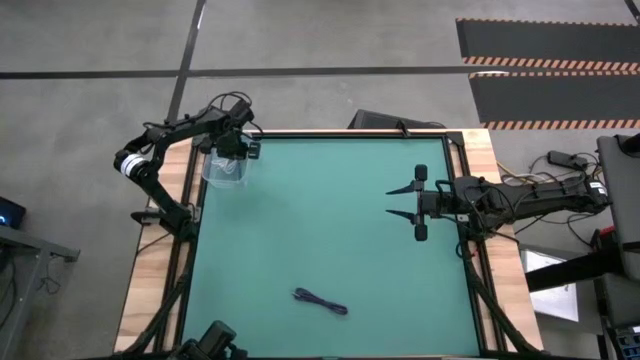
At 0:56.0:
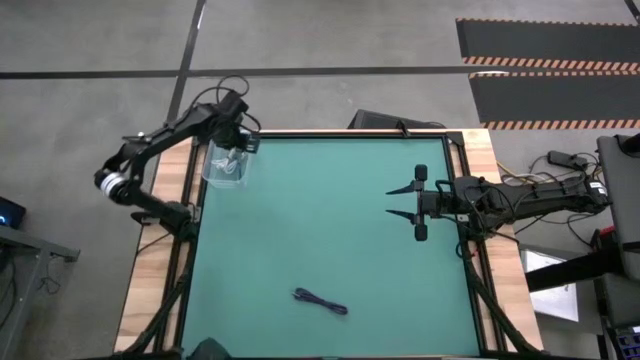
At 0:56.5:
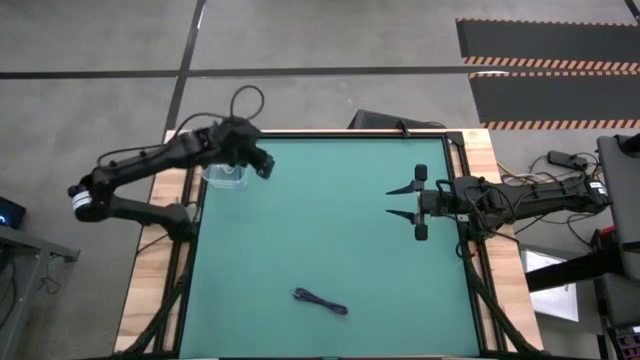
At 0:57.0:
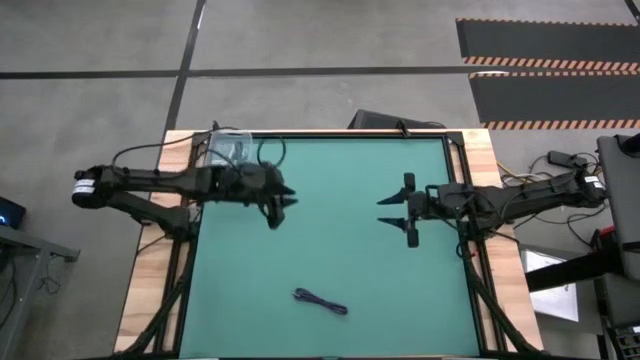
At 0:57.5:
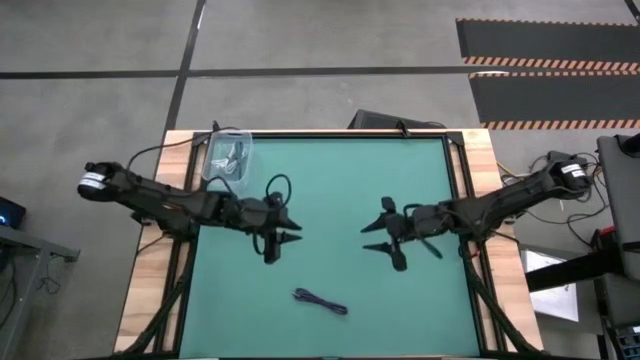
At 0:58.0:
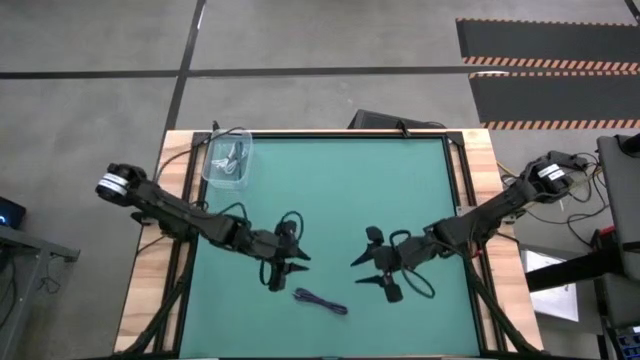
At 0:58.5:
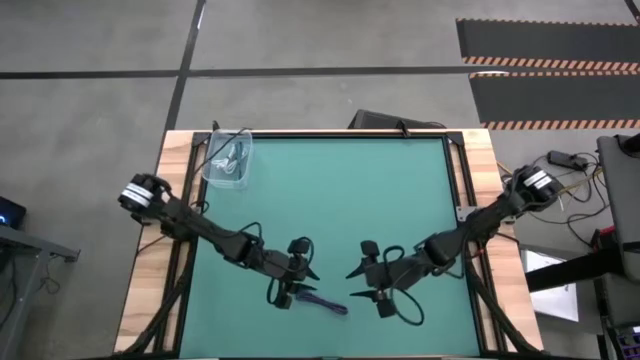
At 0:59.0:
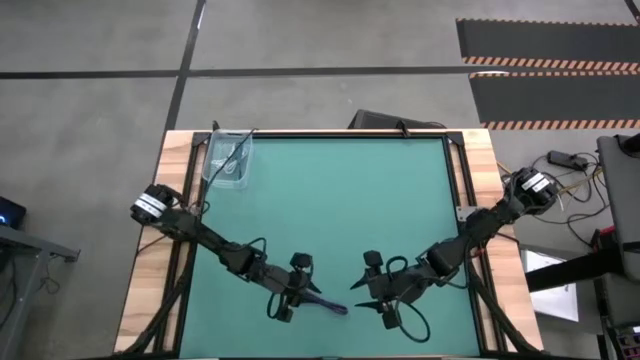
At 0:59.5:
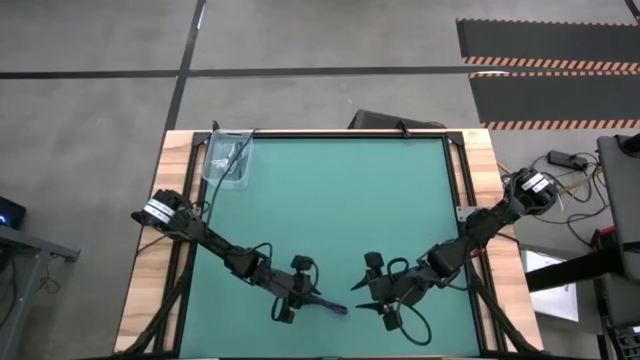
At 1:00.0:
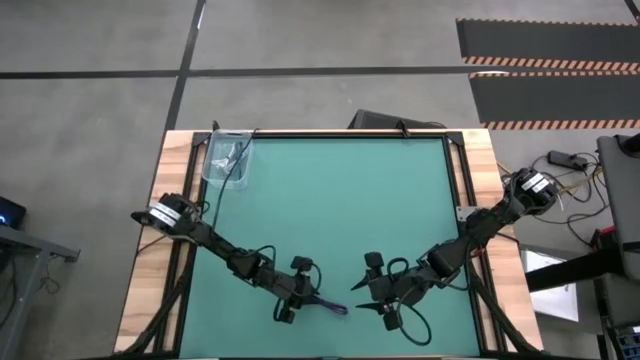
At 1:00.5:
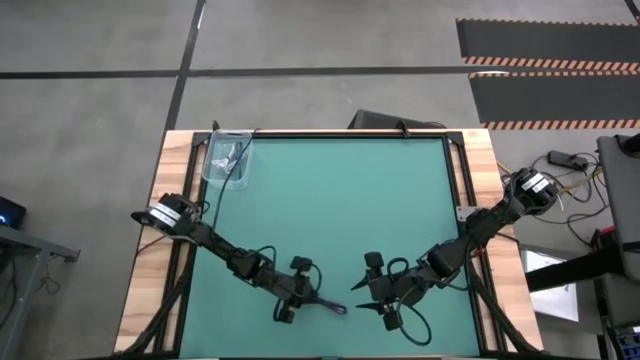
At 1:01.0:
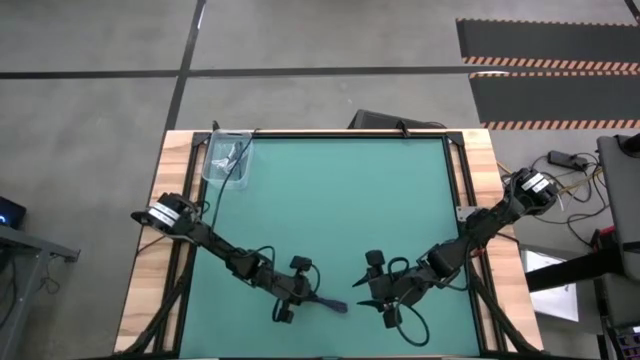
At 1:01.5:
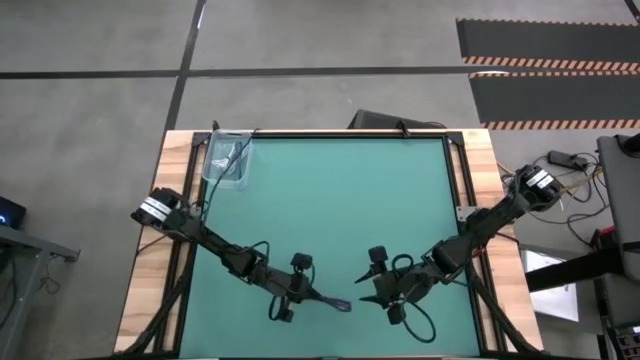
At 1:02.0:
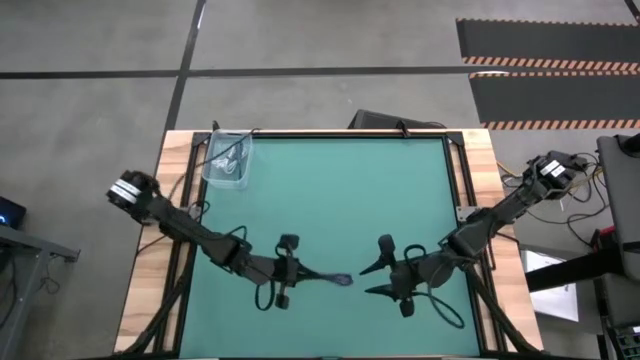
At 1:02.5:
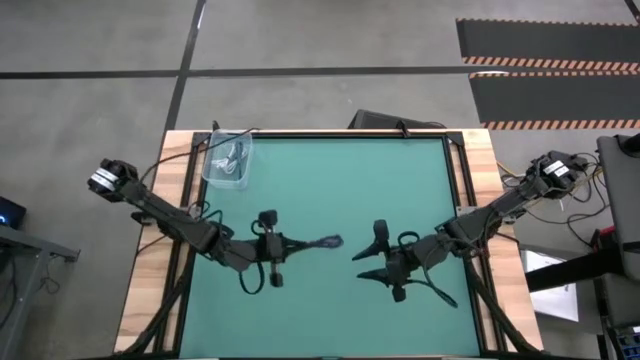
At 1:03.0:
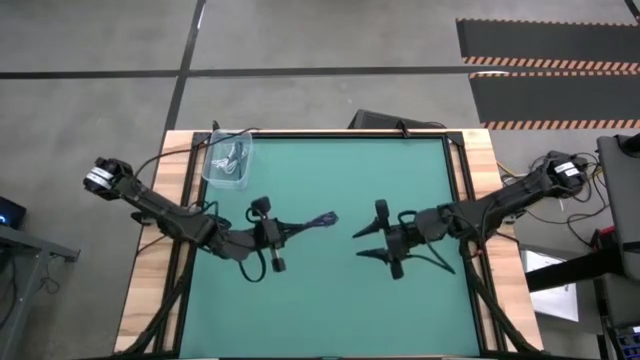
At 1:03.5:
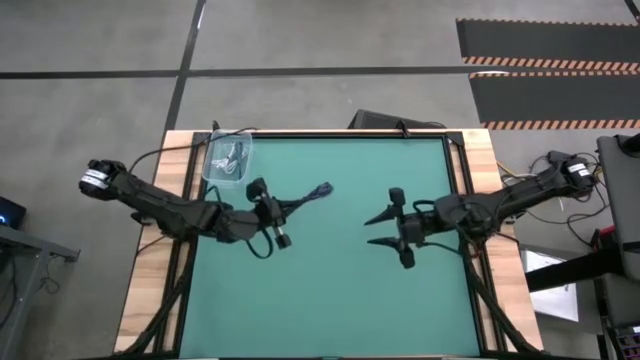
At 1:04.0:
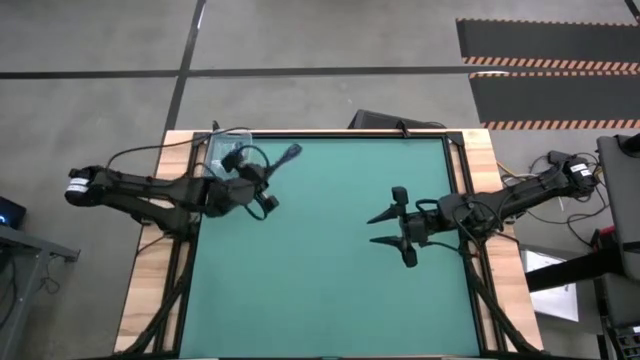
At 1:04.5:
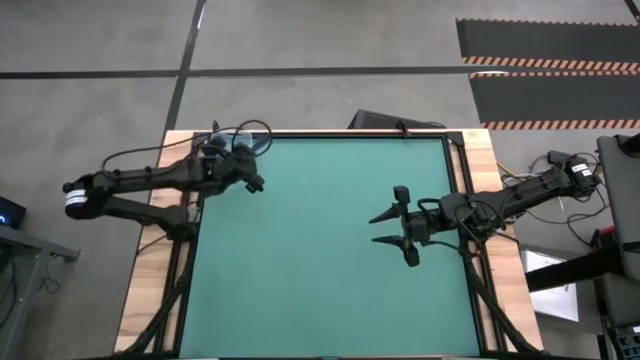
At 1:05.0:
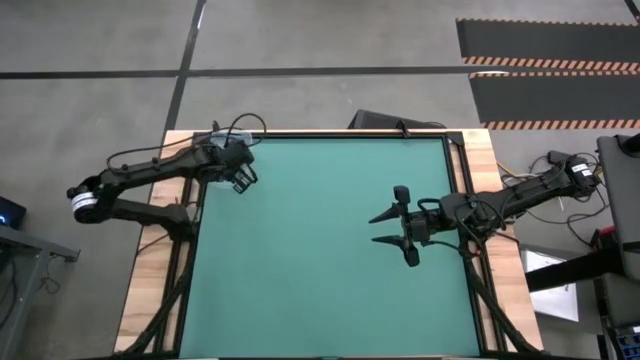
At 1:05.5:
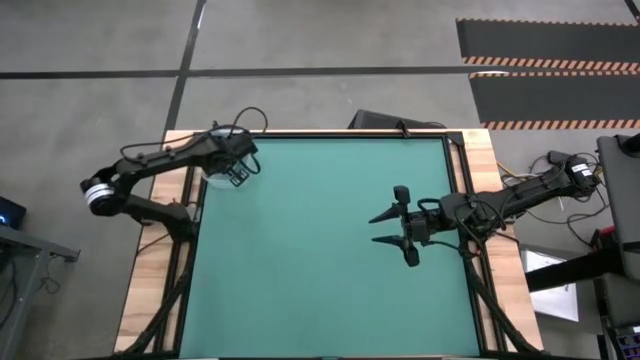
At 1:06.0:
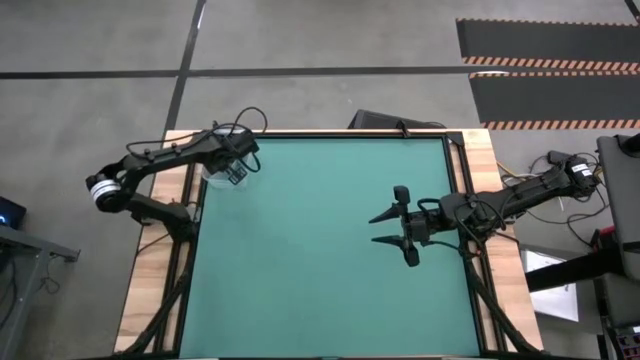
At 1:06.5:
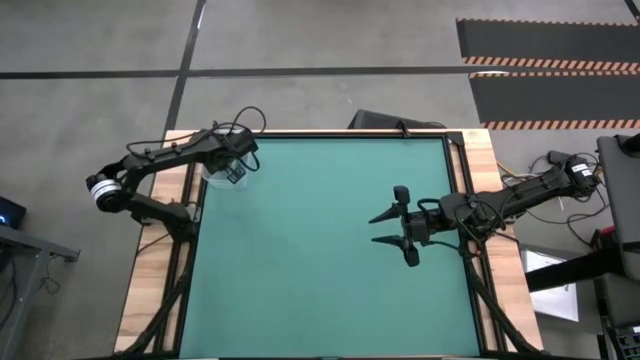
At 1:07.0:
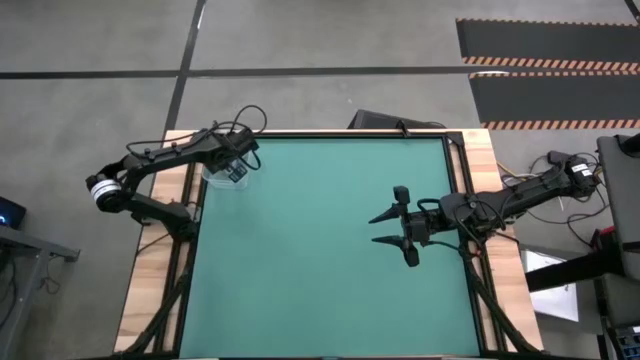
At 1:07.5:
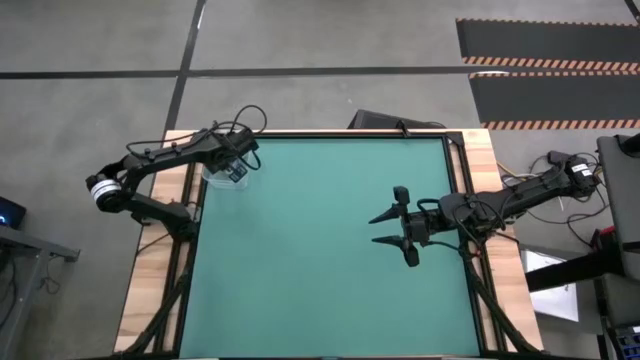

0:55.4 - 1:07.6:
Task: Pick and place USB-C Cables
Put the violet charger cable into the transparent bin

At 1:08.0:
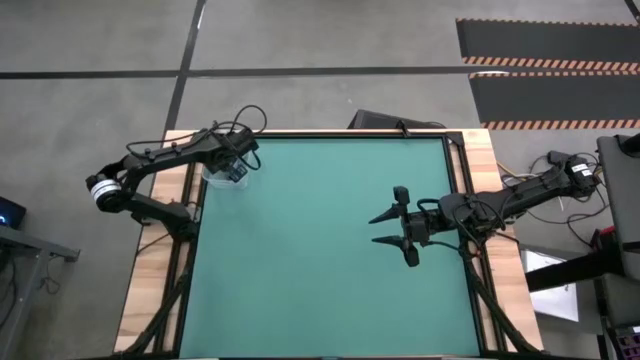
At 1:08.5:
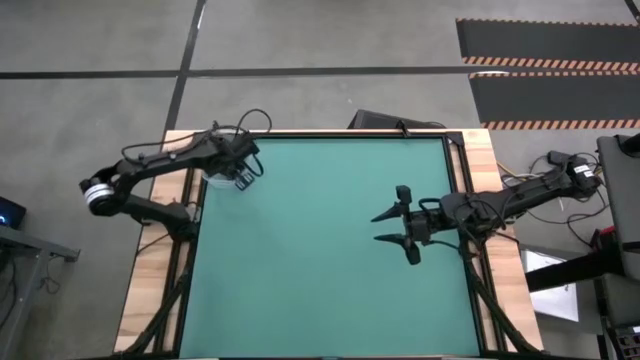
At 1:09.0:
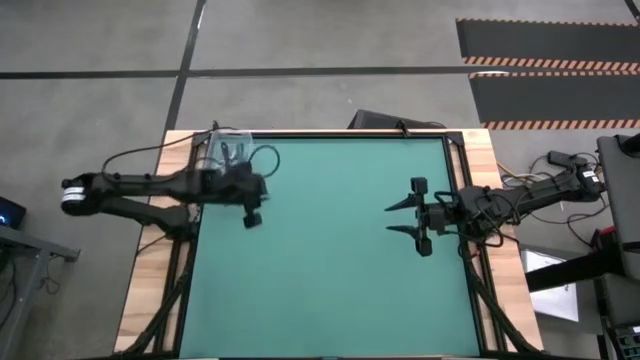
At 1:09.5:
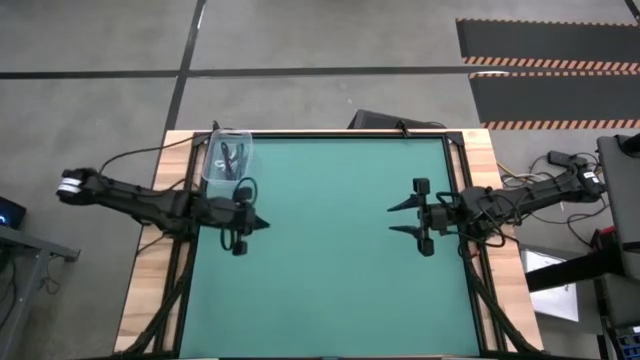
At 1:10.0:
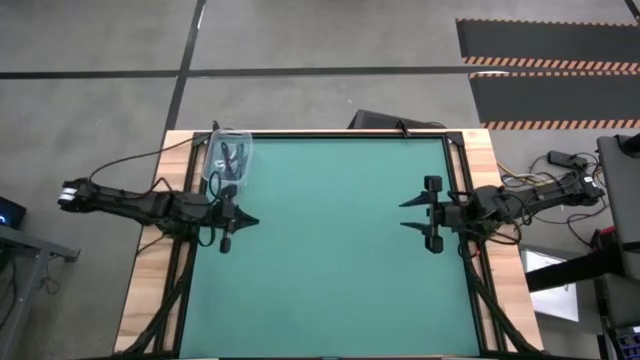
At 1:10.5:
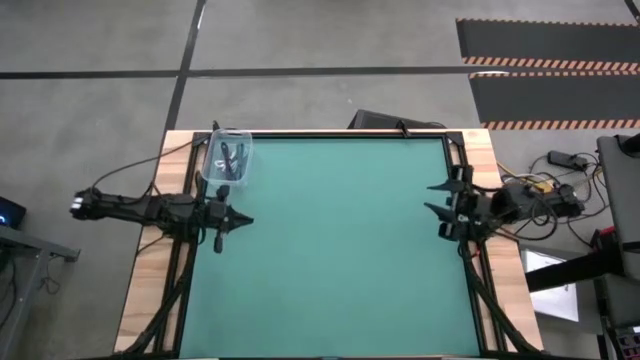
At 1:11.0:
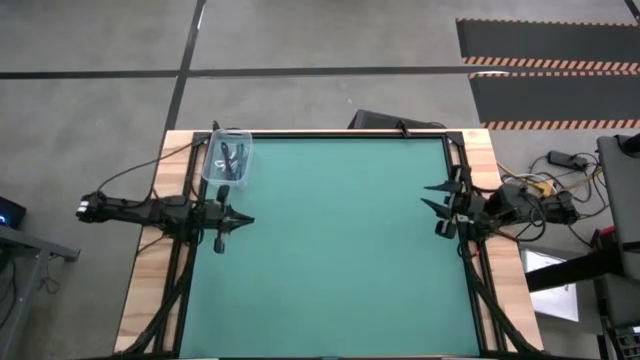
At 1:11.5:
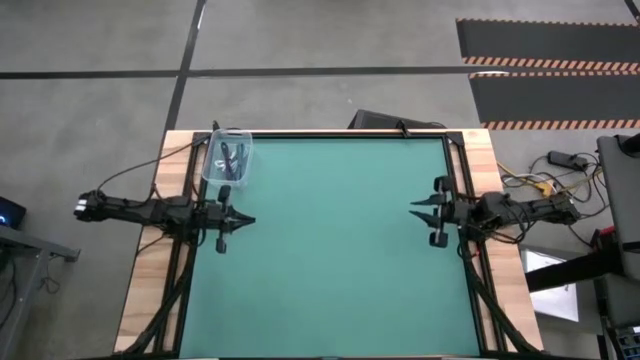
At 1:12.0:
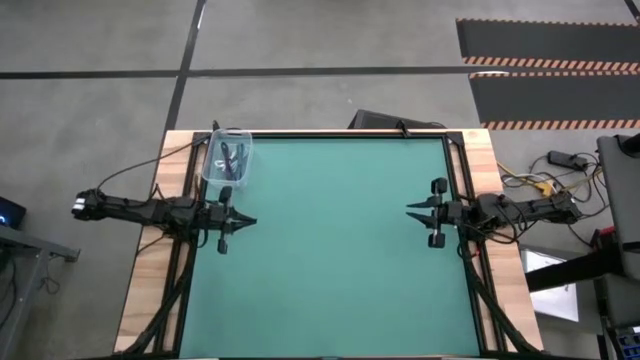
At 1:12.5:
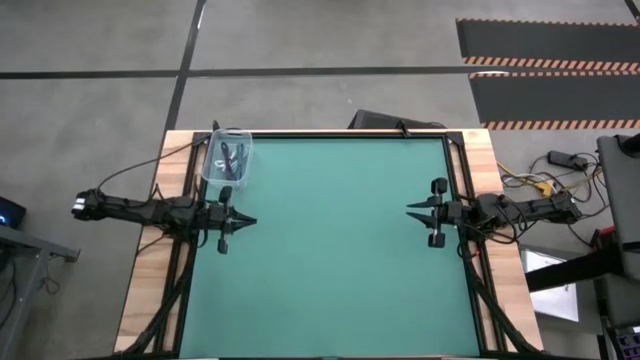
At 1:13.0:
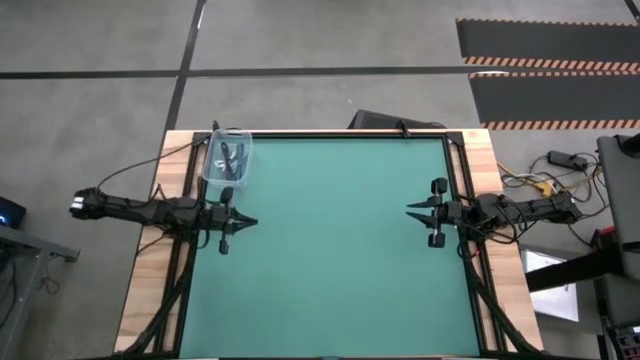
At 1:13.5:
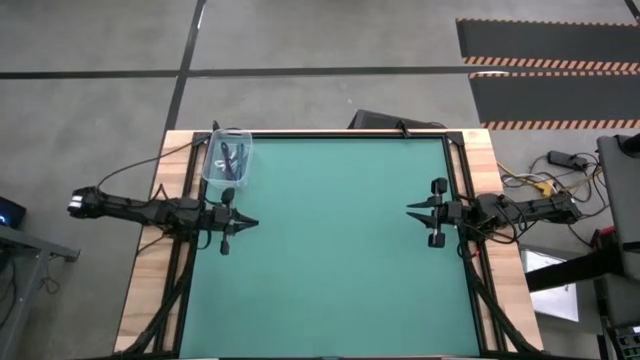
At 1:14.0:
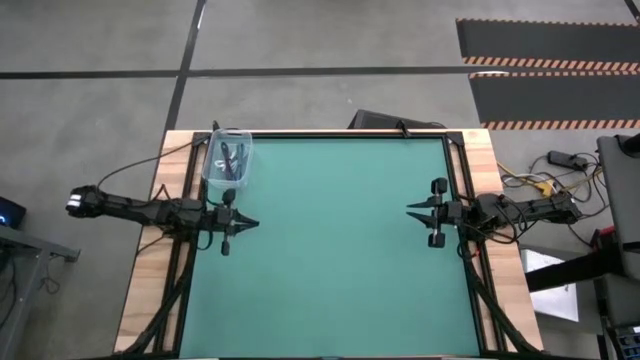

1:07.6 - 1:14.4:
Return to Home Position

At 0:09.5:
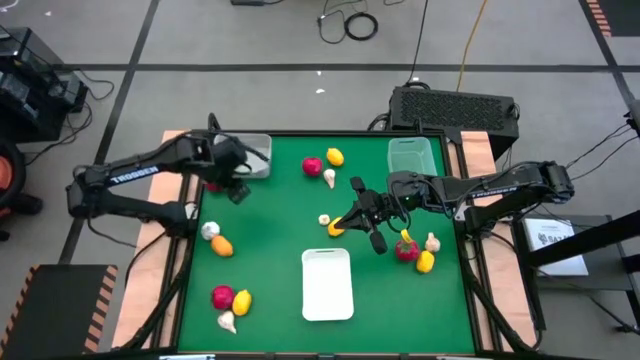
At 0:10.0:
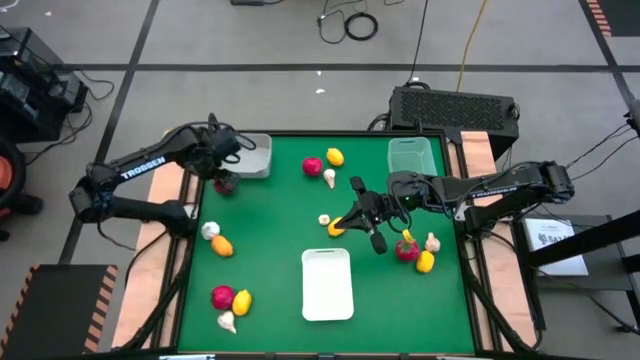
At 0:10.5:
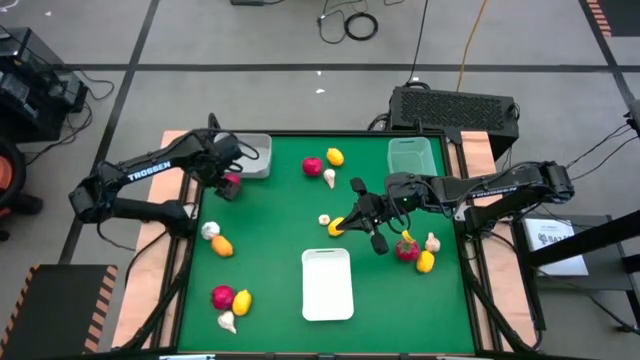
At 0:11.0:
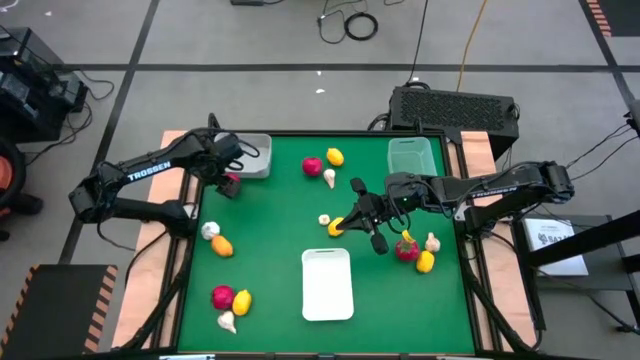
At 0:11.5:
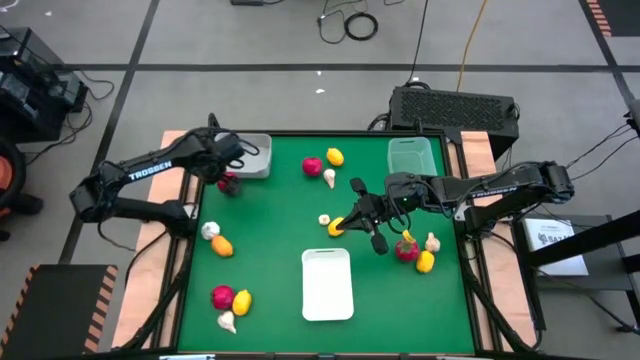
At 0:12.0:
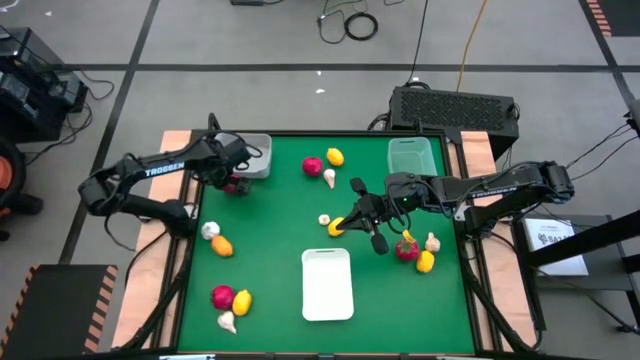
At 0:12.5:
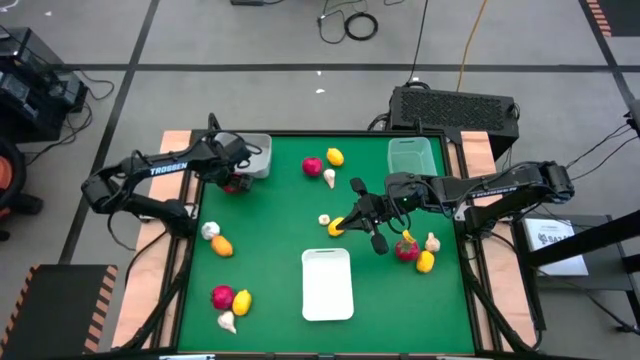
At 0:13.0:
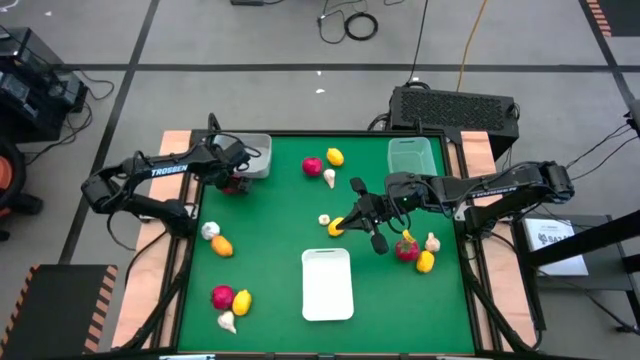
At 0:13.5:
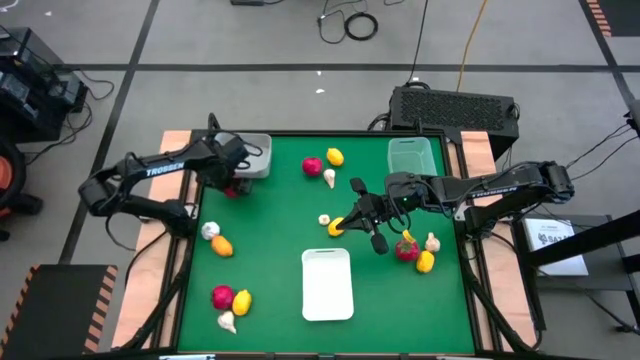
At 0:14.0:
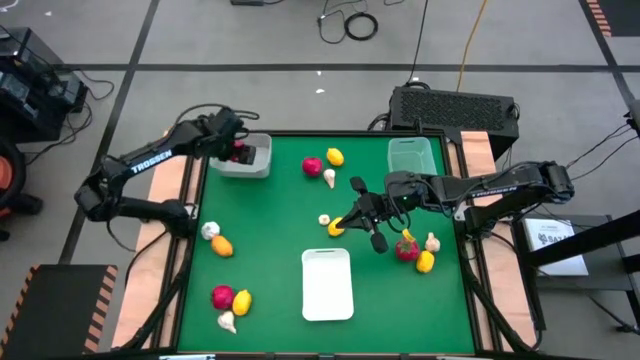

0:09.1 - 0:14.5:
Task: Sort produce into baskets
Put the middle left tomato into the gray bin
